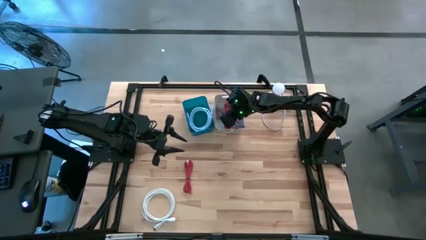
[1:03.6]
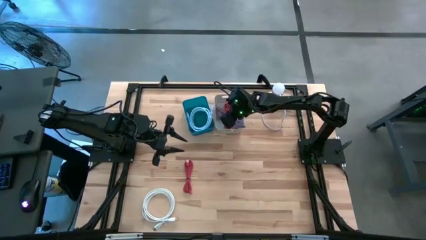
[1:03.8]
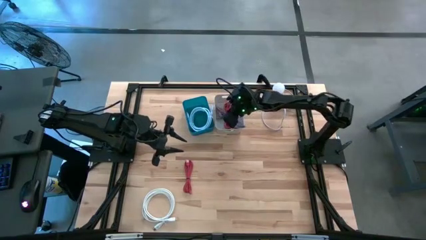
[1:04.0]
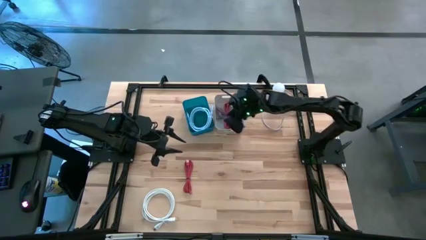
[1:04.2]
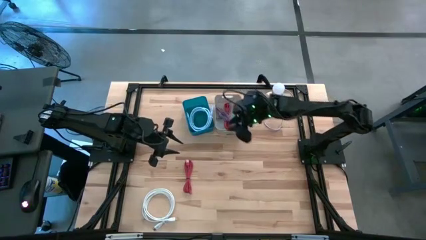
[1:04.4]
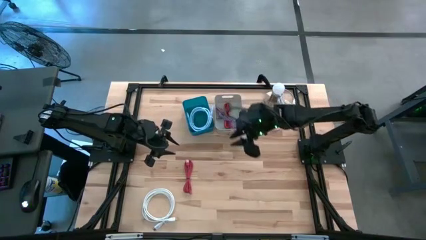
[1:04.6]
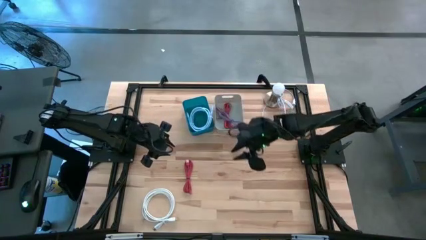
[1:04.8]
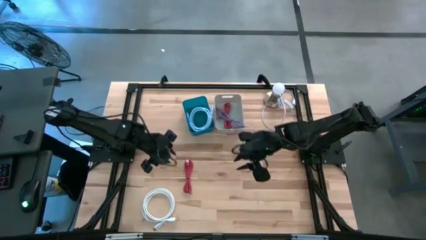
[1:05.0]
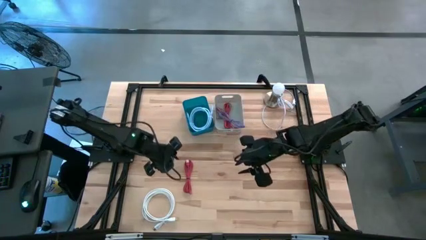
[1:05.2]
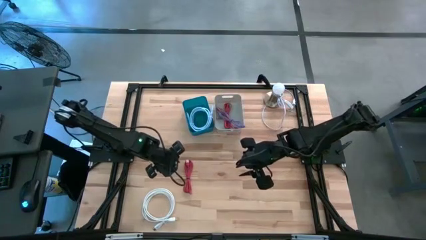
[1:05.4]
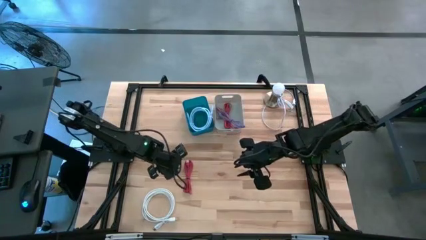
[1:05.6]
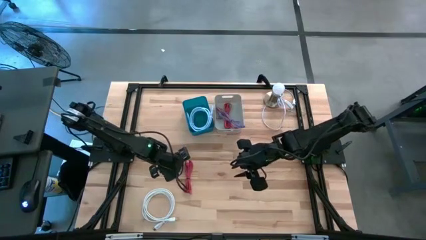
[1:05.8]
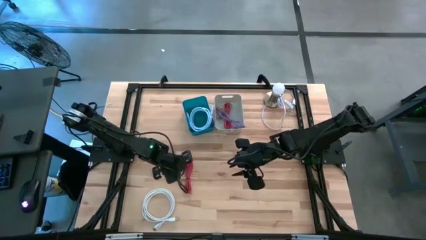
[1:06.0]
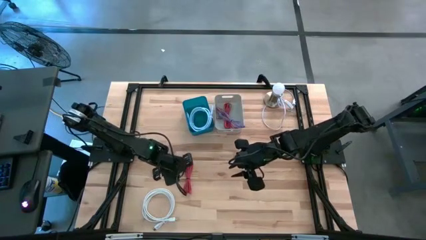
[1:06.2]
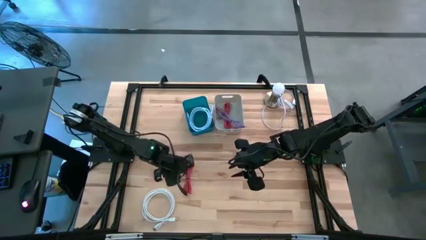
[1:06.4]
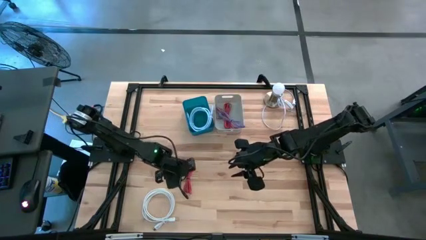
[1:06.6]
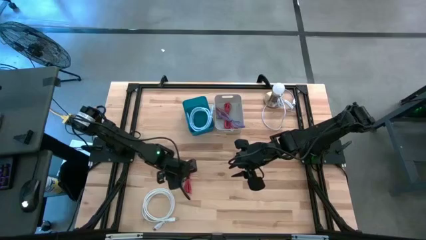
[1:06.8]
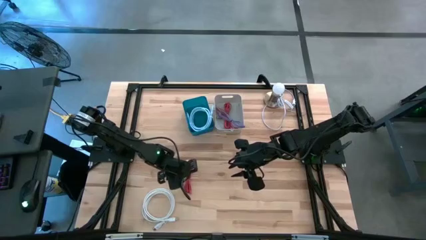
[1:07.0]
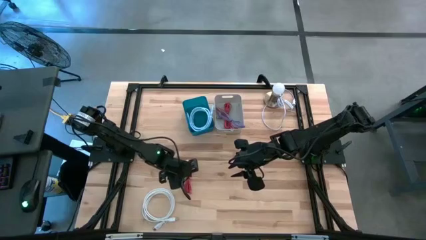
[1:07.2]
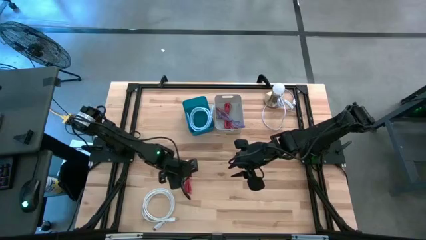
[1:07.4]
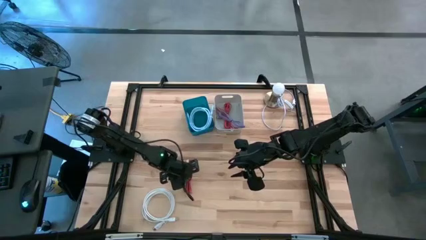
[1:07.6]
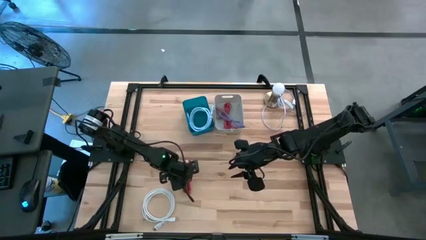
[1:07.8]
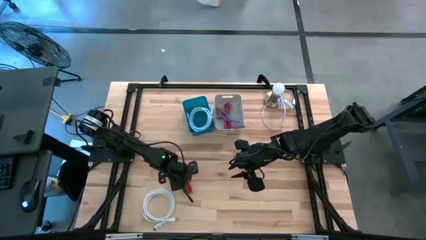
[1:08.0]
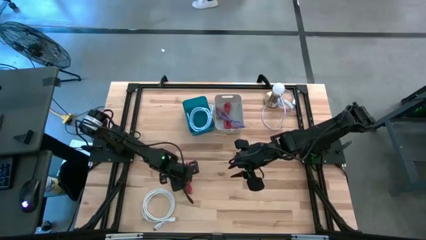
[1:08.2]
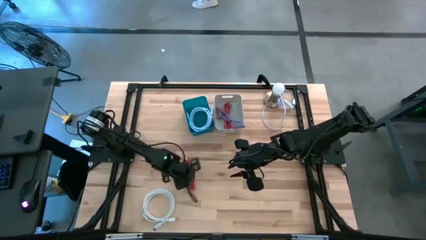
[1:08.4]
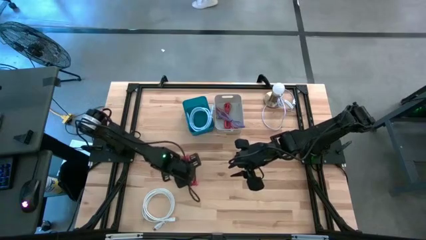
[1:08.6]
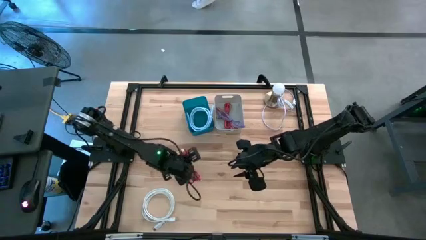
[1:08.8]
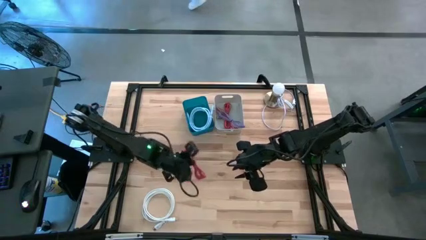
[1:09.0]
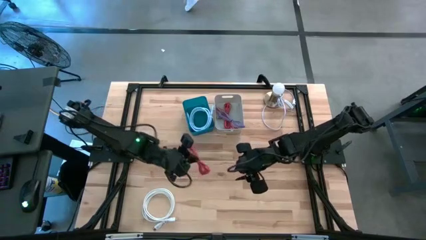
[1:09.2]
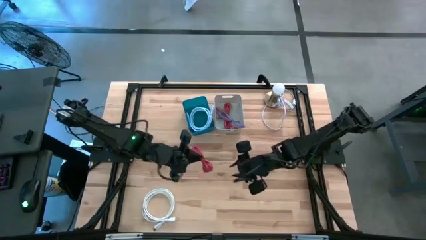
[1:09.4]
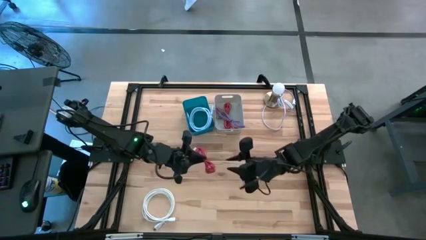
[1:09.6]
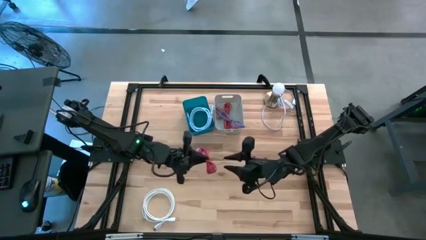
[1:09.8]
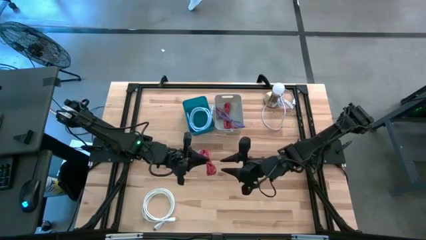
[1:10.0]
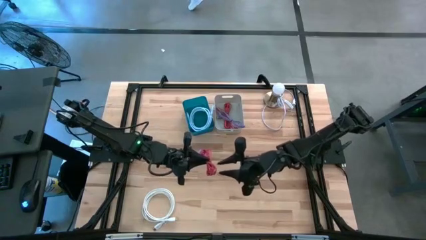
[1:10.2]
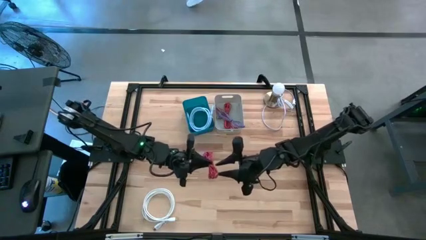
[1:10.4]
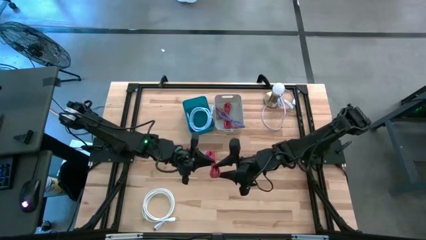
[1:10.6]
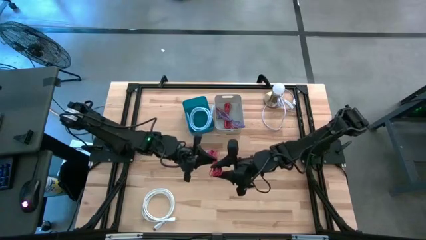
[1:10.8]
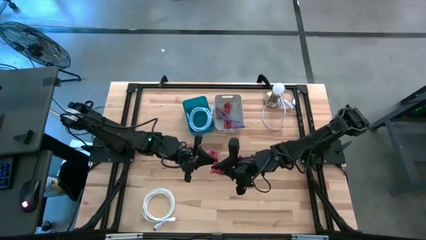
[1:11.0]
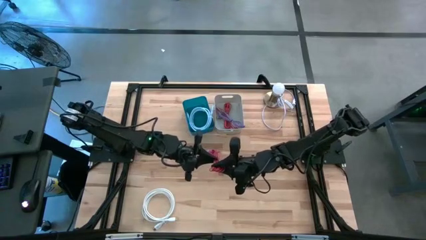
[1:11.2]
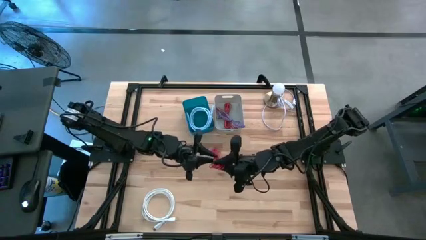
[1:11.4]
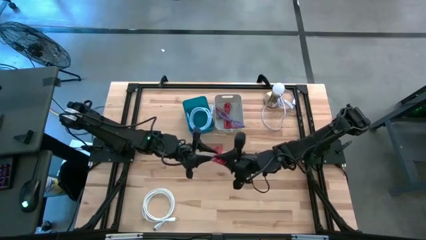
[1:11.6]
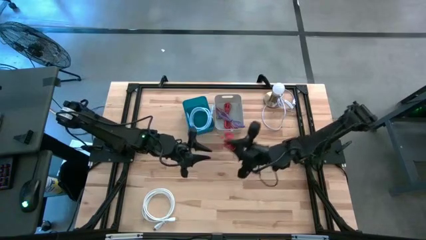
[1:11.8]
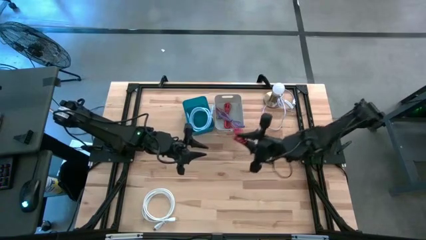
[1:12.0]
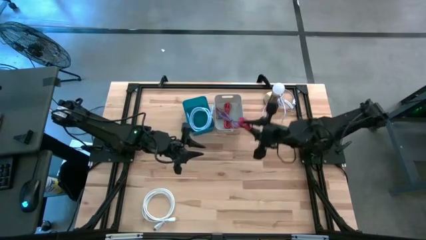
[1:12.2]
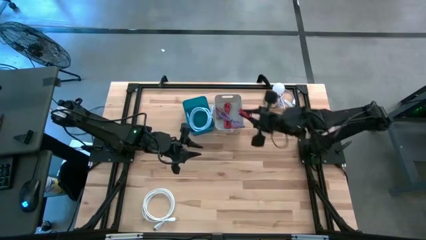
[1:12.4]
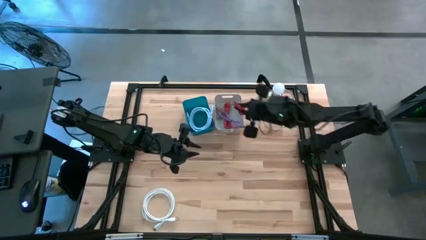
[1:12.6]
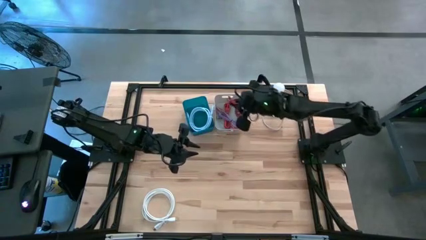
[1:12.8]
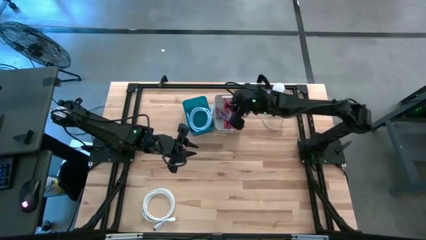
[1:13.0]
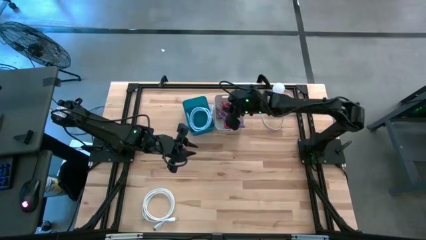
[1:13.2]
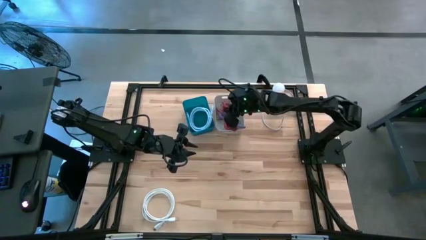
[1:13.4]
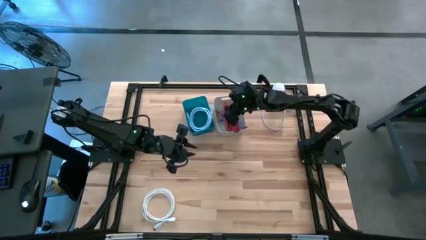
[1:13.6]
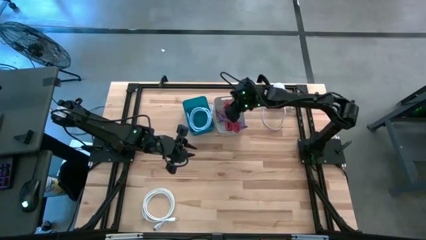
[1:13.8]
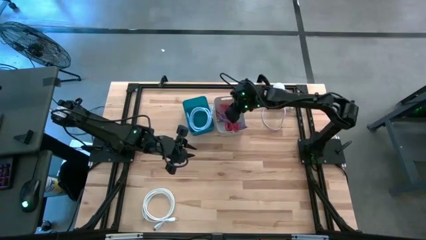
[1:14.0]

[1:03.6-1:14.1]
Task: Pick & Place USB Port
Put the red charger cable into the gray bin
